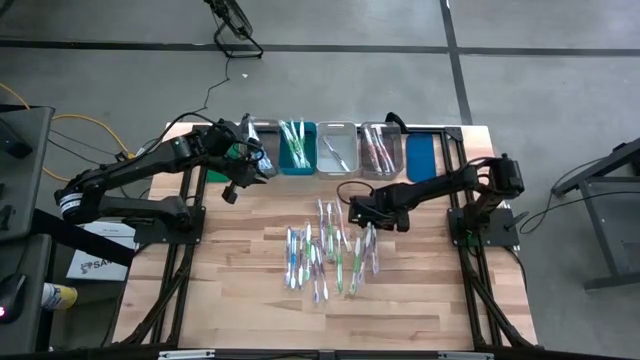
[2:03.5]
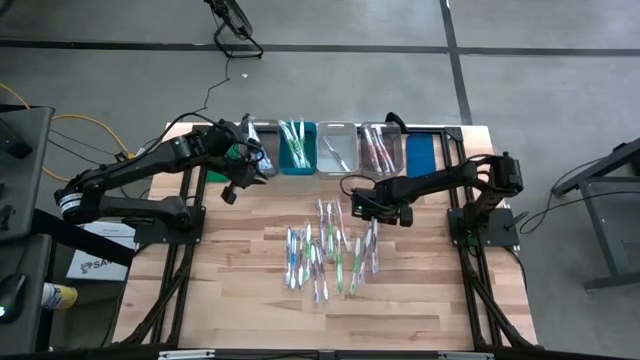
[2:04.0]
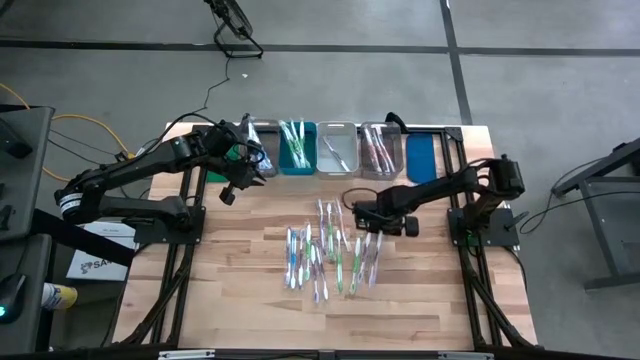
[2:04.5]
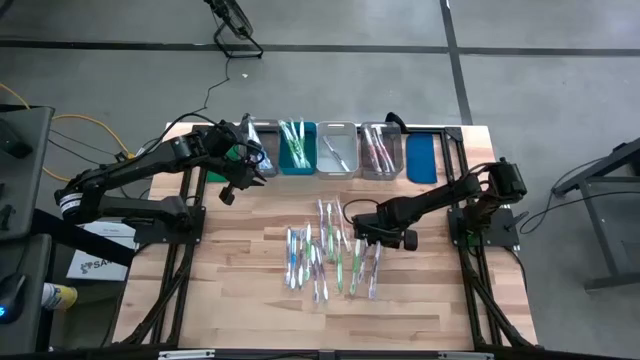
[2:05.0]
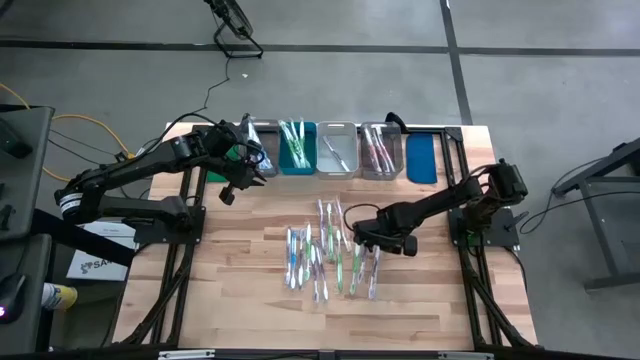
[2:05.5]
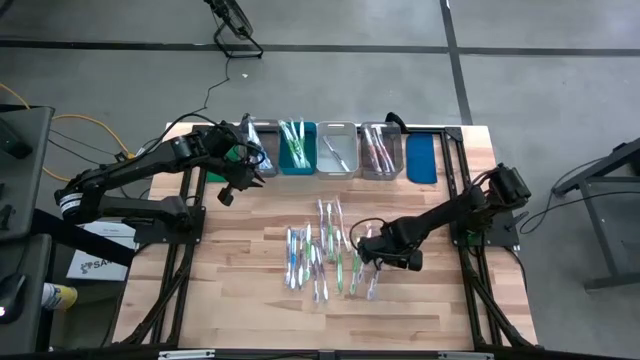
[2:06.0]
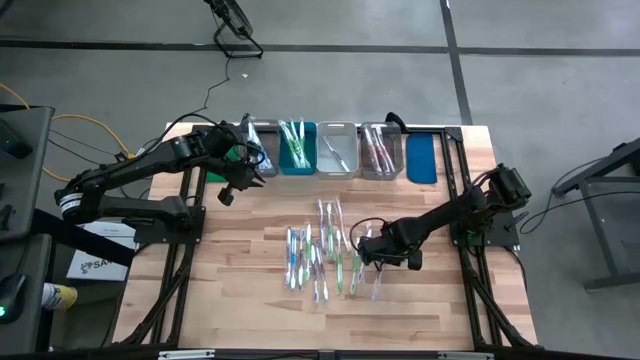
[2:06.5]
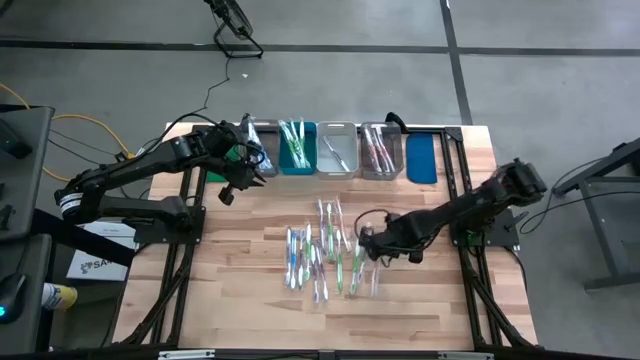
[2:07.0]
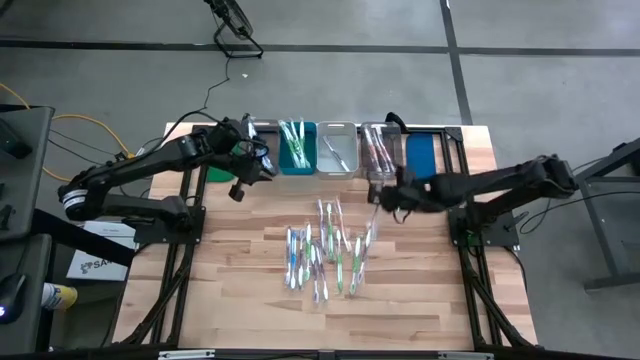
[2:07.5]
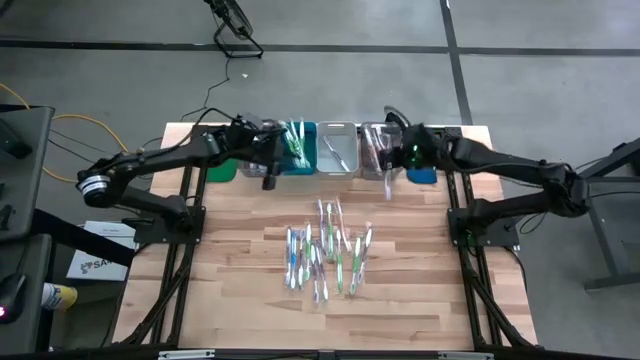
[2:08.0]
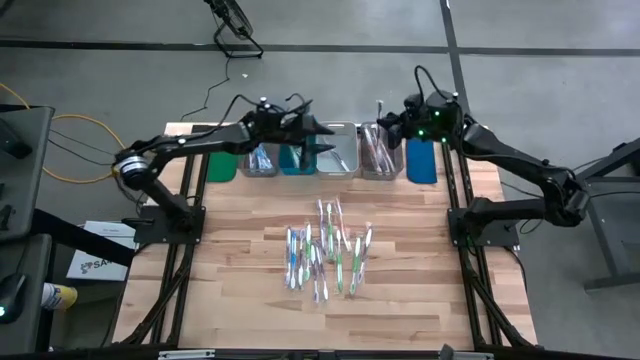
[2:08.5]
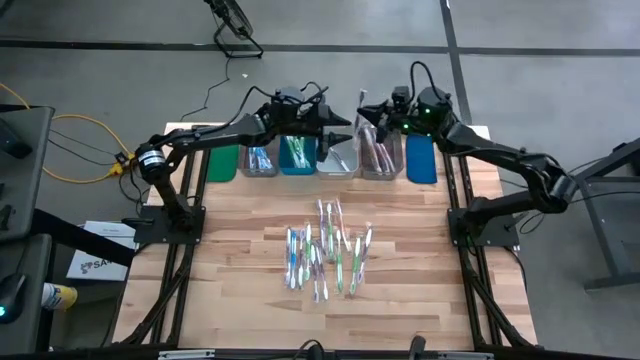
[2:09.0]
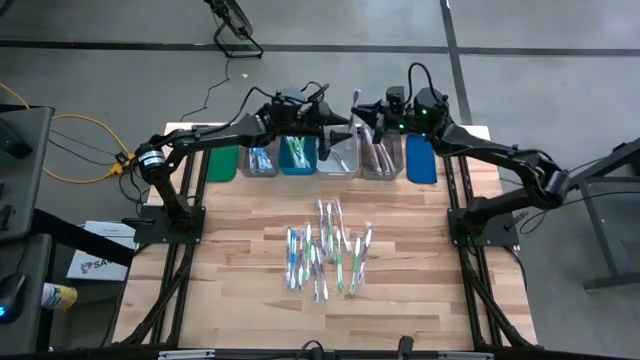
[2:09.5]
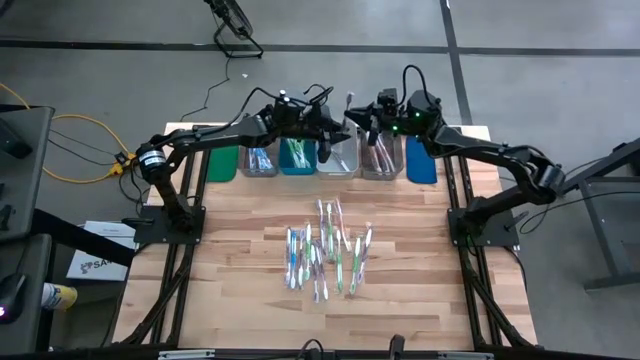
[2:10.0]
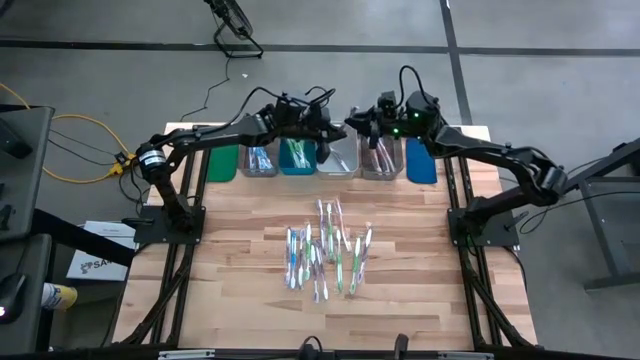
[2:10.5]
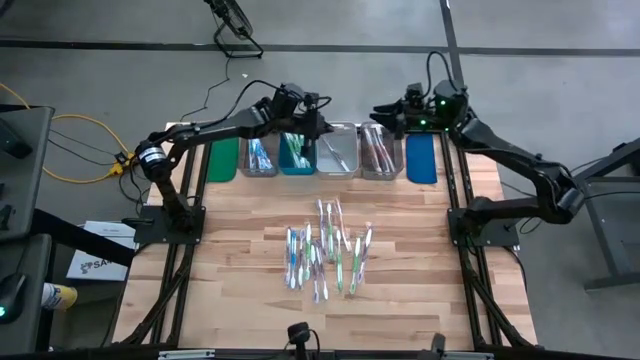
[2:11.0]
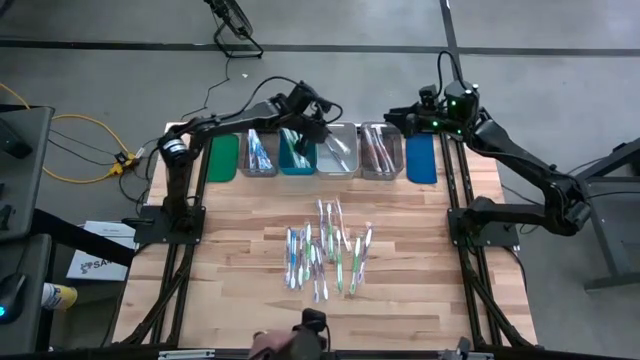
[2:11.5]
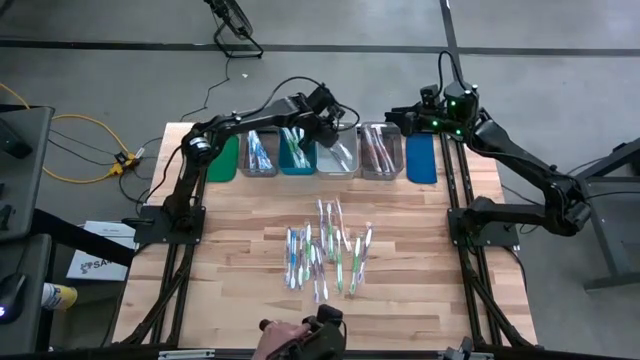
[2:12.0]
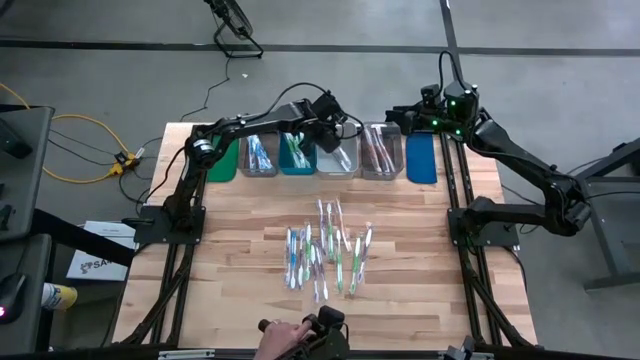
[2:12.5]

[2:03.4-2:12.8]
Task: Pick & Place Toothbrushes
Put the purple toothbrush into the white bin

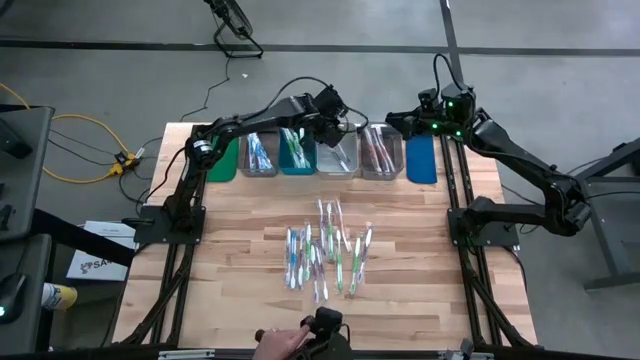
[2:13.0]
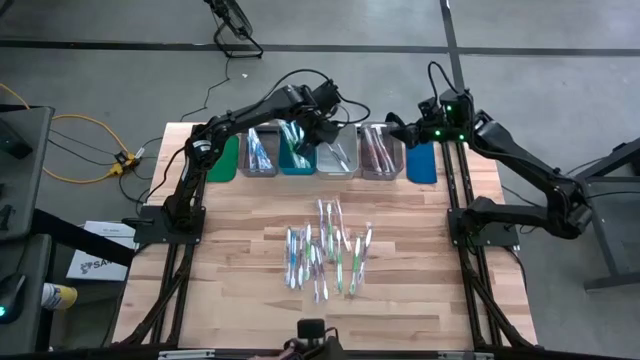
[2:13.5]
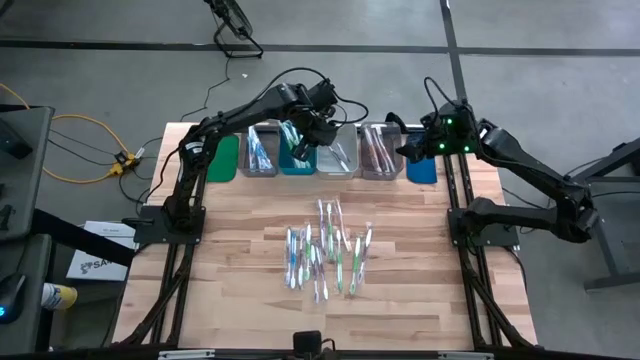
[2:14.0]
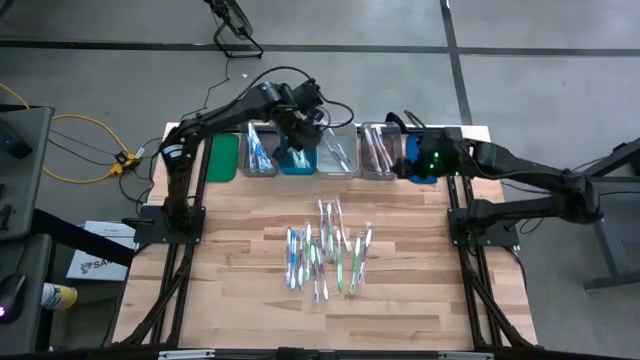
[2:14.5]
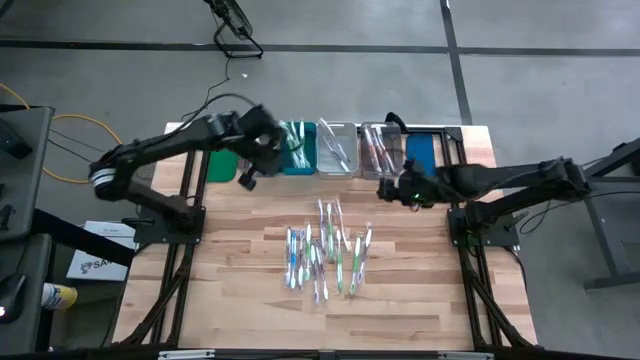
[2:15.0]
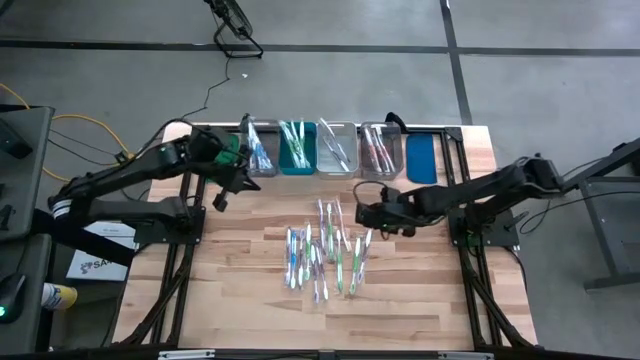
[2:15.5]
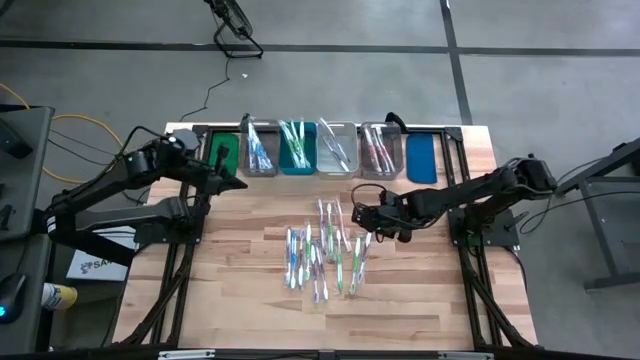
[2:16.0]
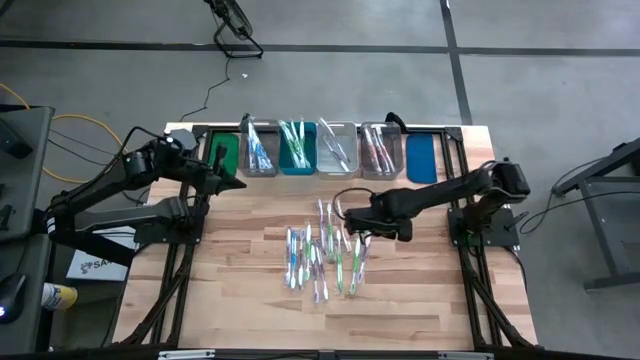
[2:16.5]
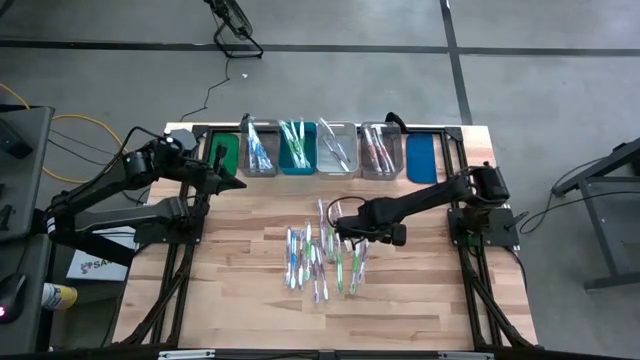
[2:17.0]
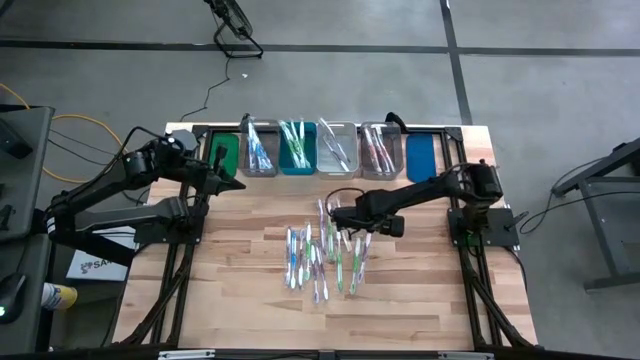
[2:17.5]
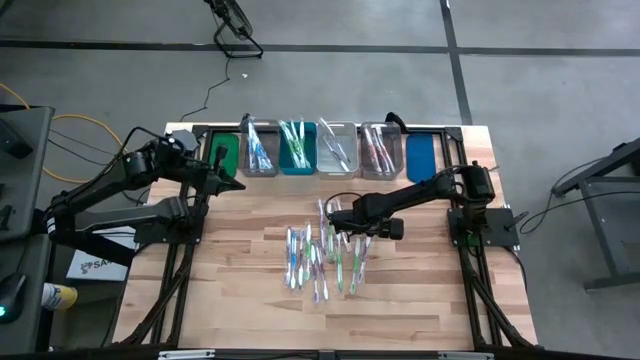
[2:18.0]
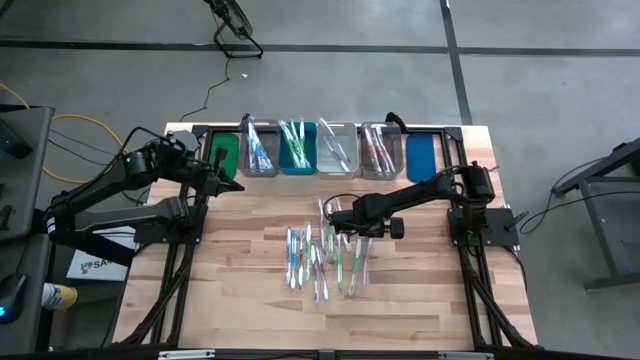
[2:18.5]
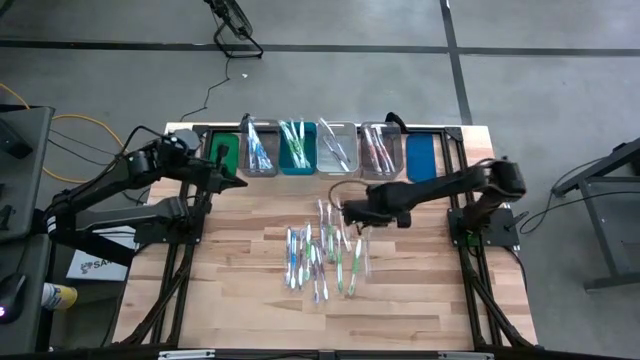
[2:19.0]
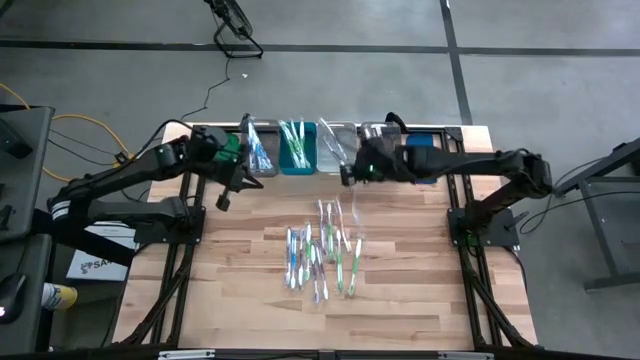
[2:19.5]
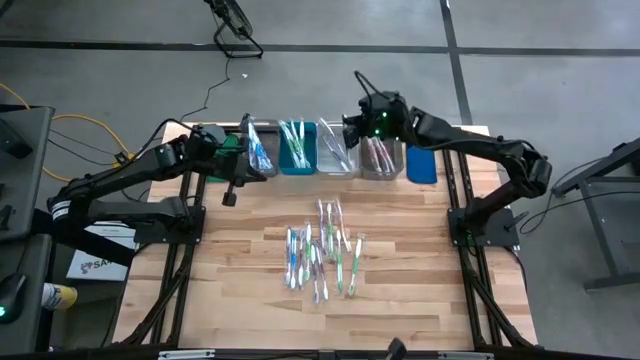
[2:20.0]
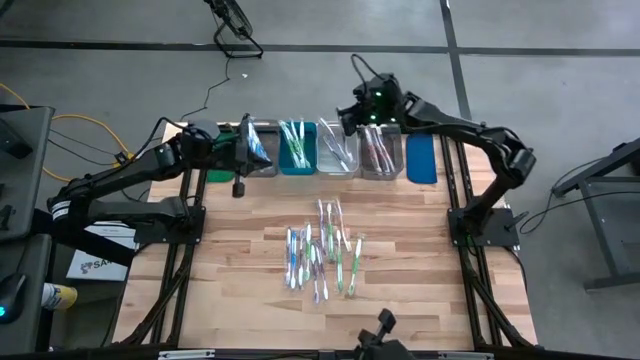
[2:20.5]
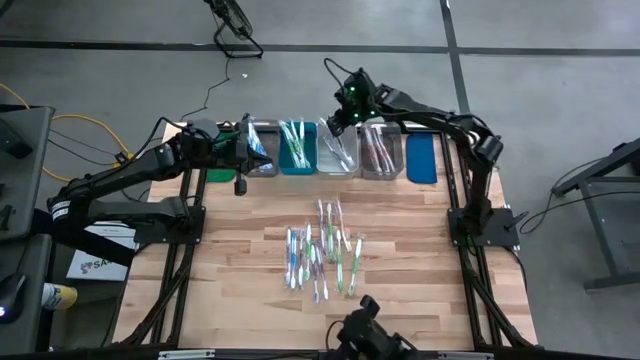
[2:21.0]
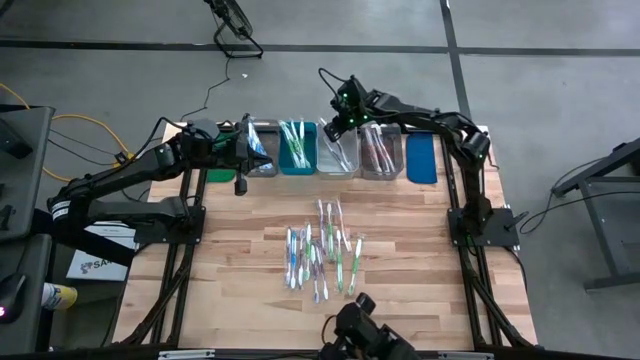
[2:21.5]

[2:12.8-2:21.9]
Put the purple toothbrush into the white bin

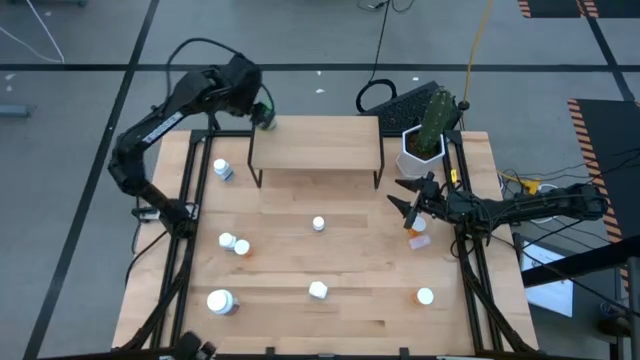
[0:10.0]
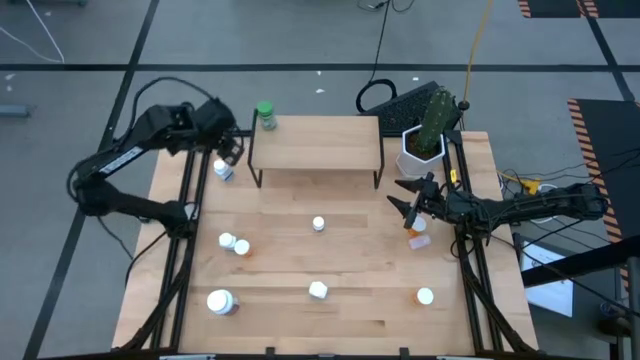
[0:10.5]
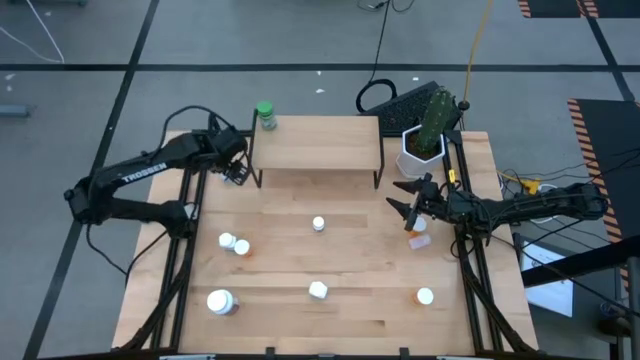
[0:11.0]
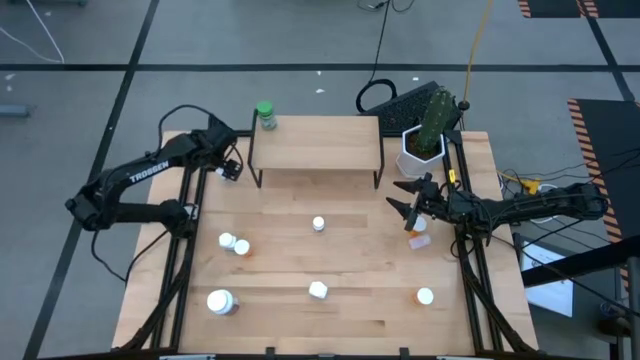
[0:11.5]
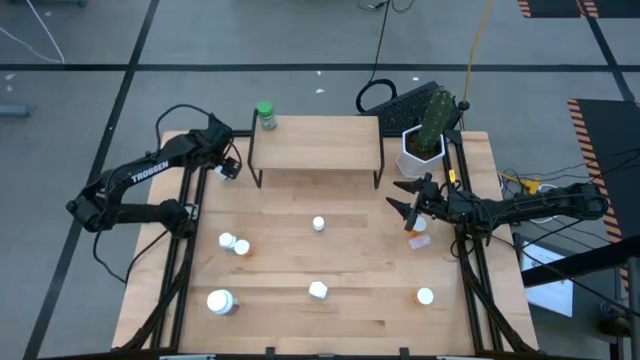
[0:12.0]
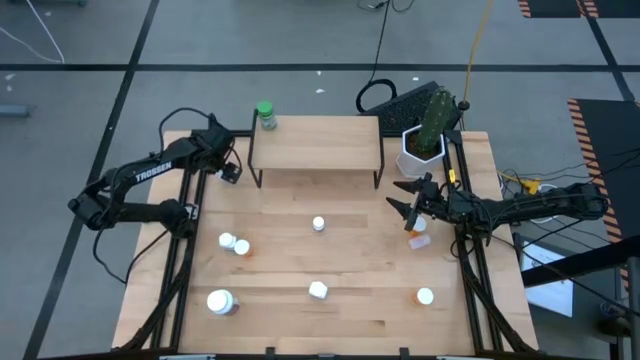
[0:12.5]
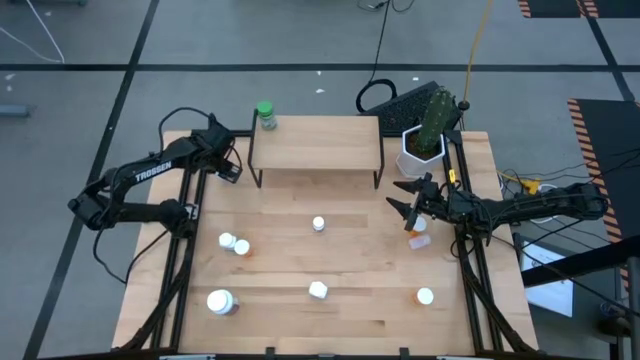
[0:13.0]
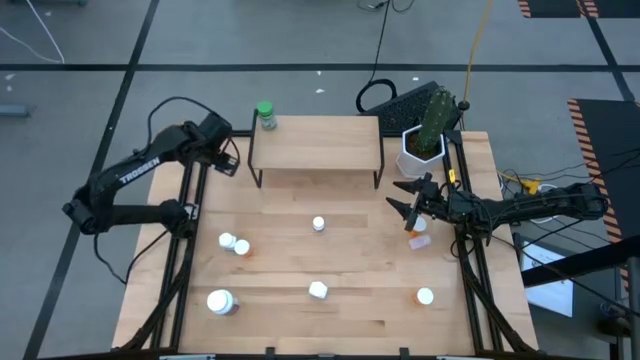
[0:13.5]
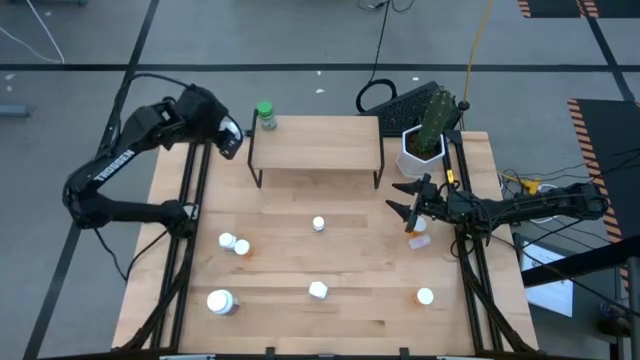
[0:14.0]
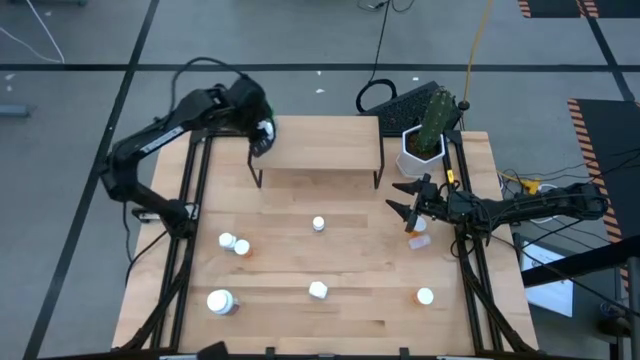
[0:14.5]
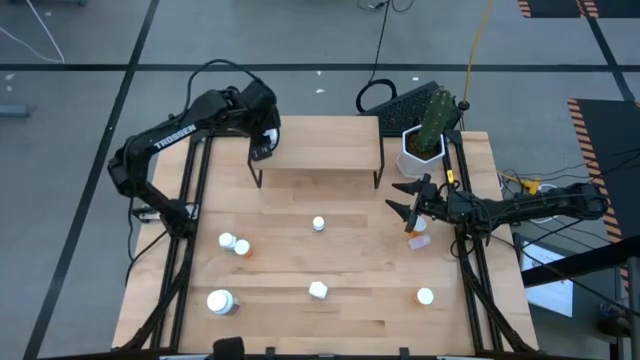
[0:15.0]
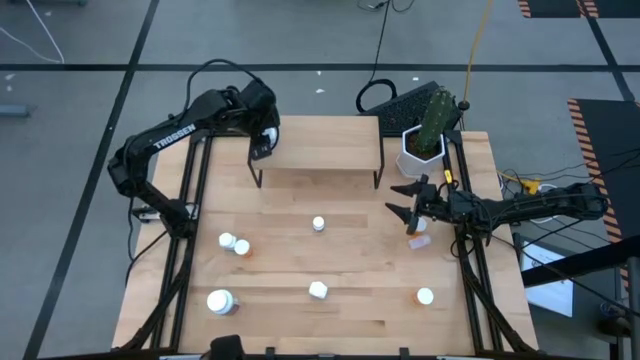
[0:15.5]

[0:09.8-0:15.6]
Task: Pick and place medicine bottles onto shelf by color
Put the top large white medicine bottle on the shelf
